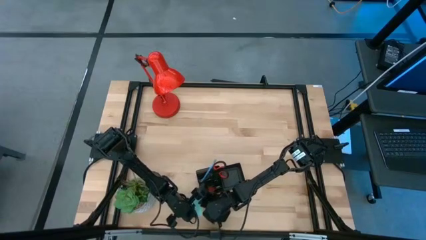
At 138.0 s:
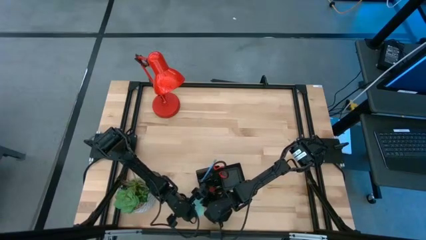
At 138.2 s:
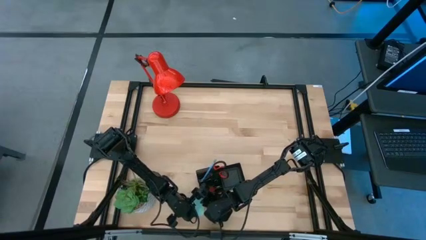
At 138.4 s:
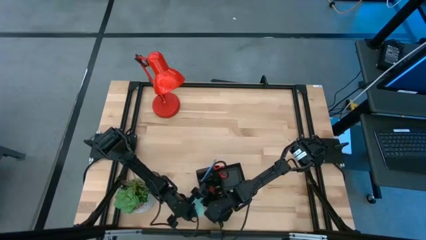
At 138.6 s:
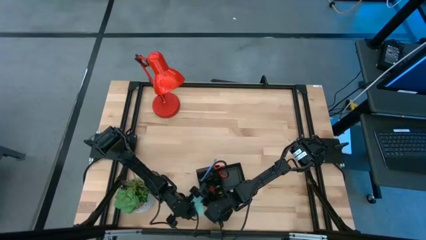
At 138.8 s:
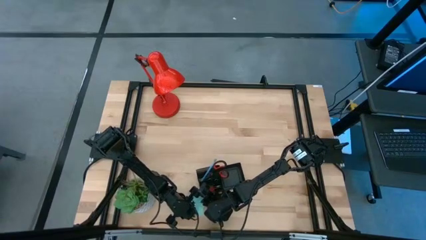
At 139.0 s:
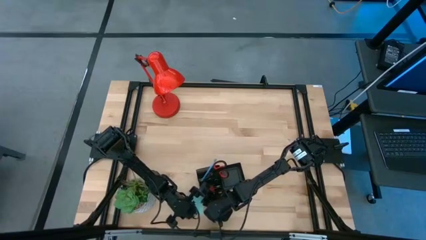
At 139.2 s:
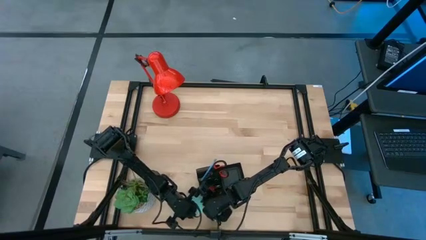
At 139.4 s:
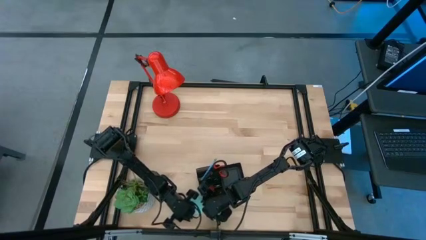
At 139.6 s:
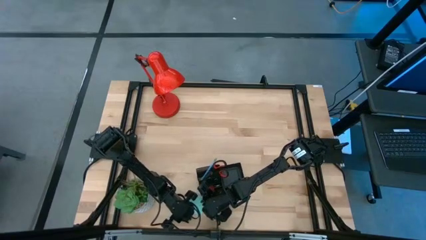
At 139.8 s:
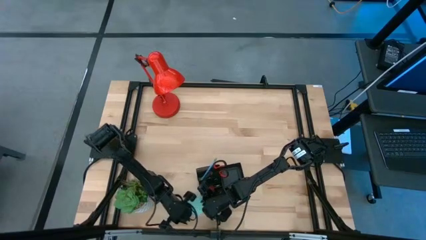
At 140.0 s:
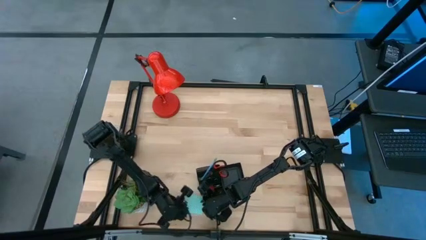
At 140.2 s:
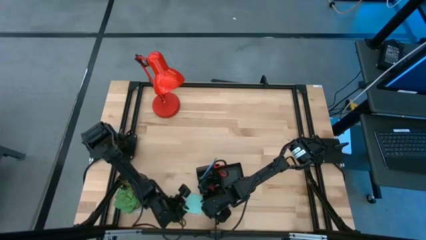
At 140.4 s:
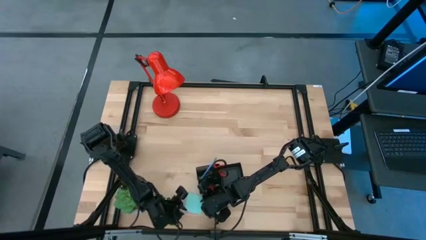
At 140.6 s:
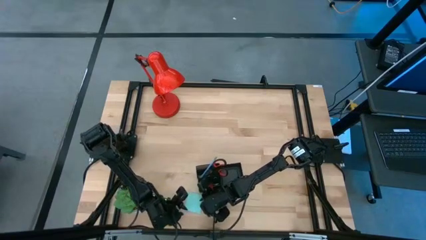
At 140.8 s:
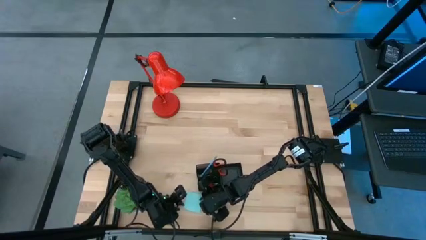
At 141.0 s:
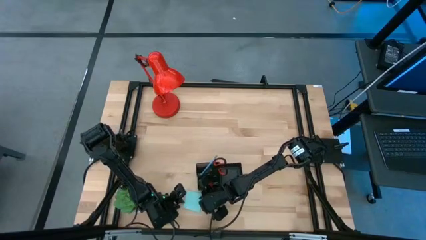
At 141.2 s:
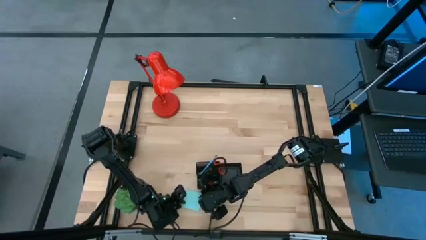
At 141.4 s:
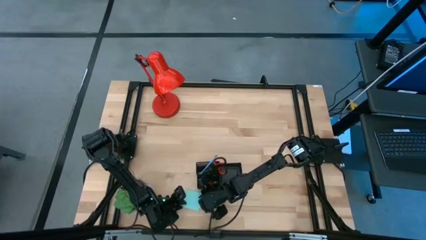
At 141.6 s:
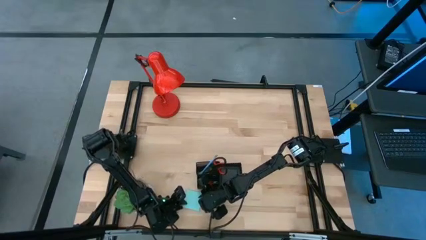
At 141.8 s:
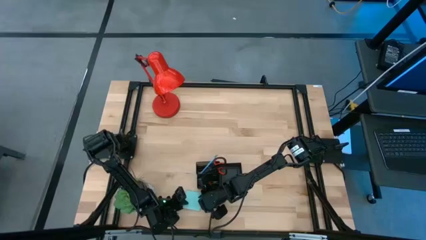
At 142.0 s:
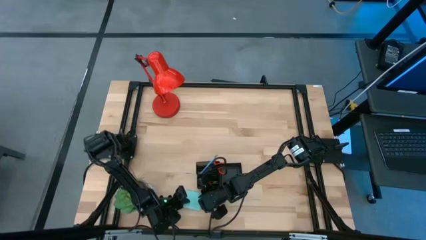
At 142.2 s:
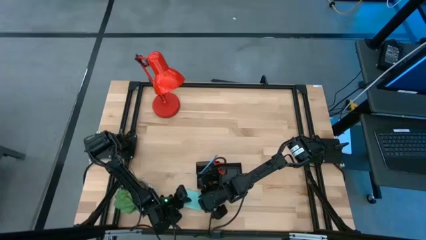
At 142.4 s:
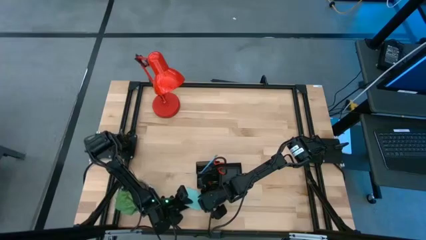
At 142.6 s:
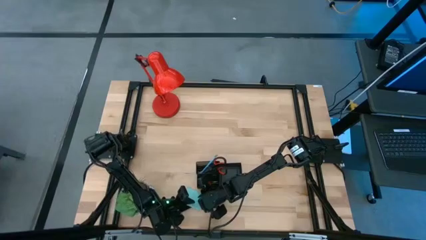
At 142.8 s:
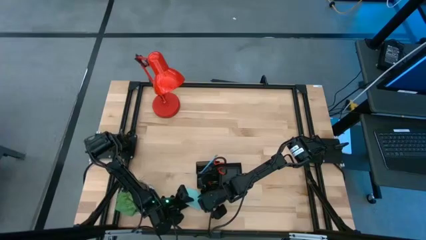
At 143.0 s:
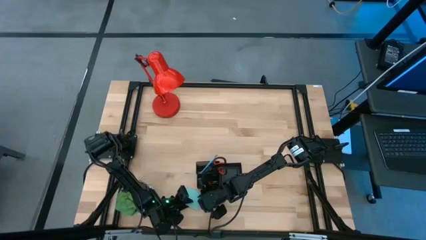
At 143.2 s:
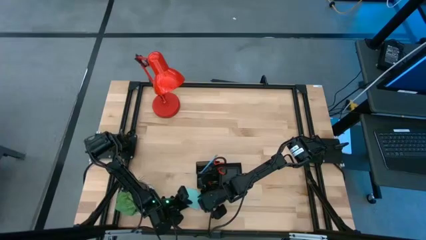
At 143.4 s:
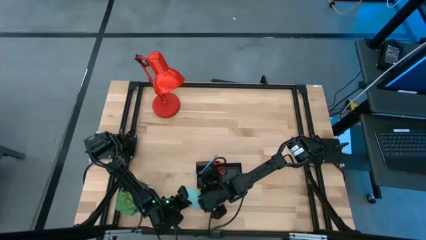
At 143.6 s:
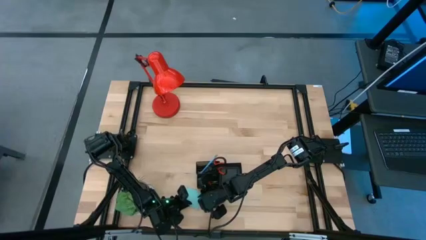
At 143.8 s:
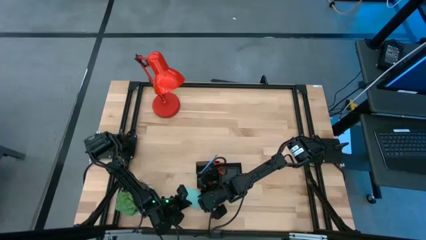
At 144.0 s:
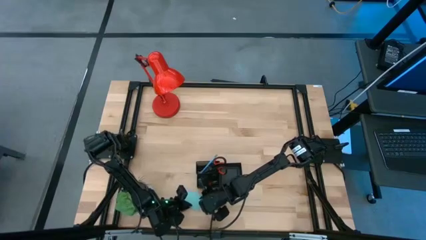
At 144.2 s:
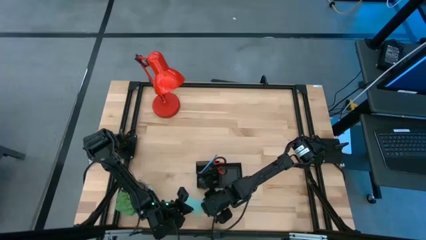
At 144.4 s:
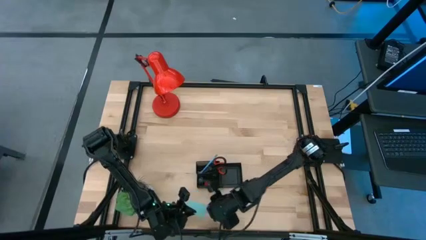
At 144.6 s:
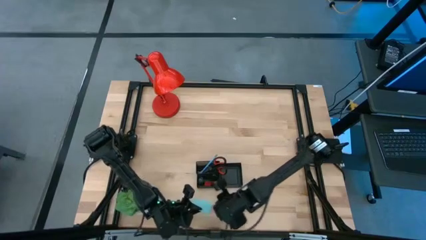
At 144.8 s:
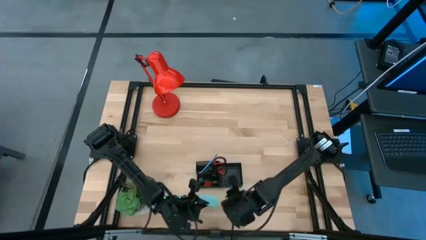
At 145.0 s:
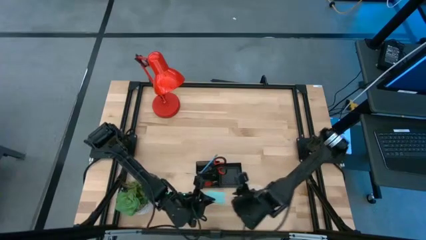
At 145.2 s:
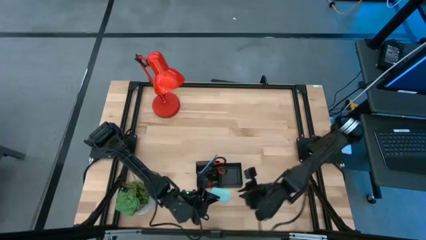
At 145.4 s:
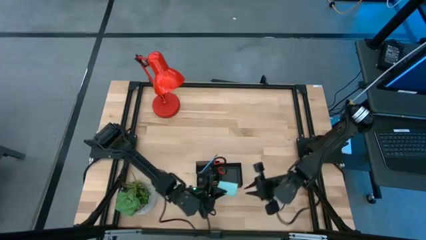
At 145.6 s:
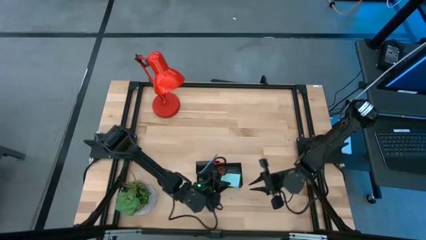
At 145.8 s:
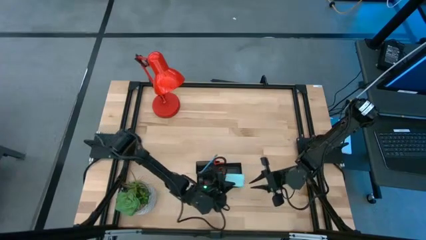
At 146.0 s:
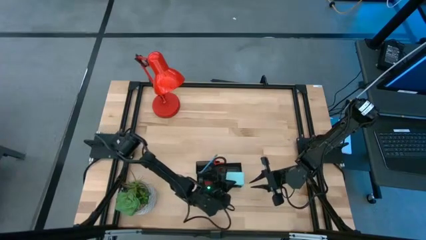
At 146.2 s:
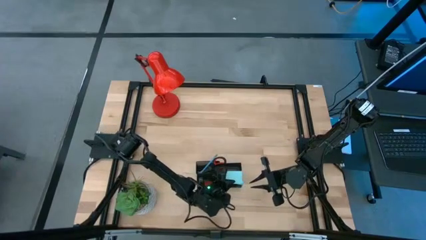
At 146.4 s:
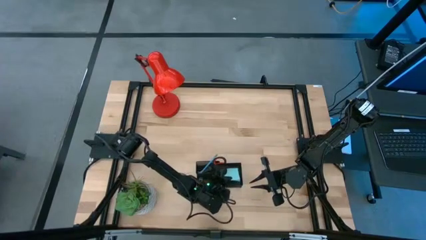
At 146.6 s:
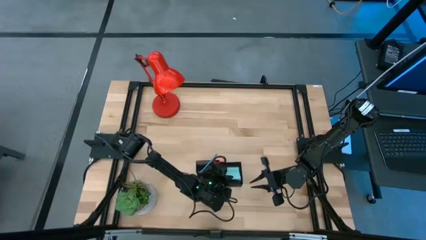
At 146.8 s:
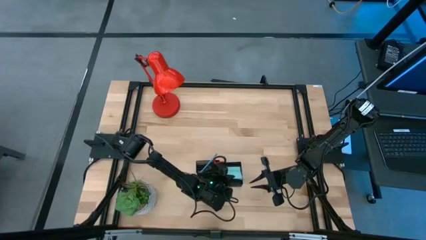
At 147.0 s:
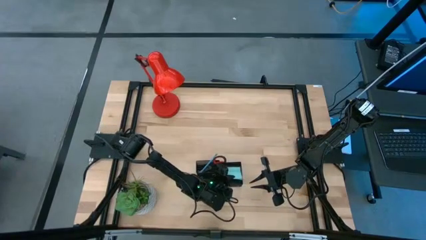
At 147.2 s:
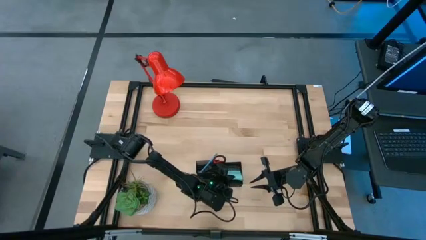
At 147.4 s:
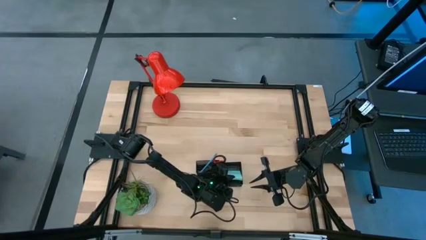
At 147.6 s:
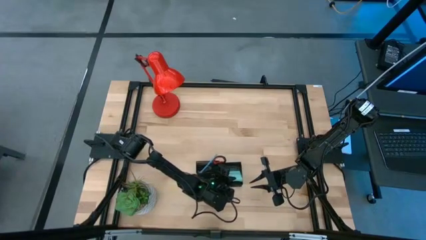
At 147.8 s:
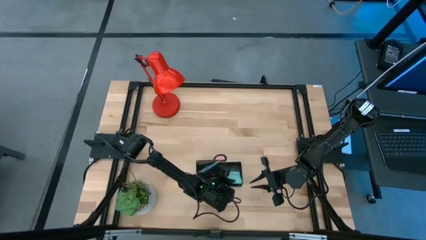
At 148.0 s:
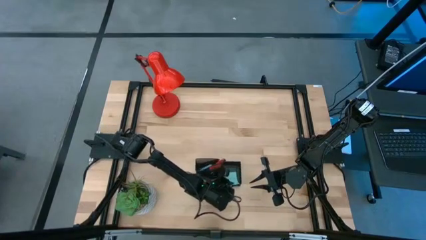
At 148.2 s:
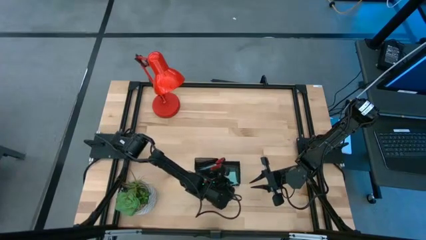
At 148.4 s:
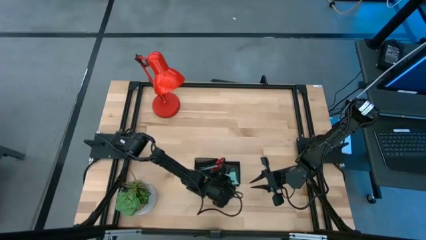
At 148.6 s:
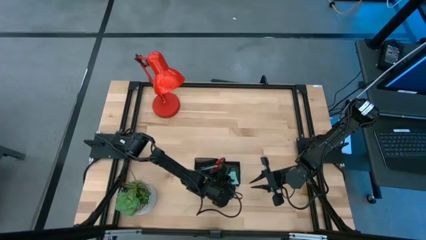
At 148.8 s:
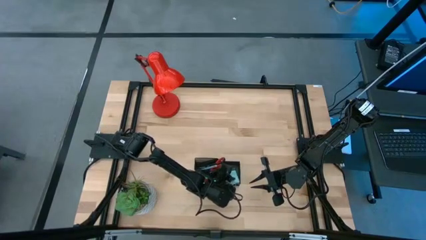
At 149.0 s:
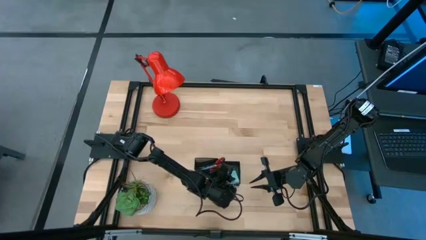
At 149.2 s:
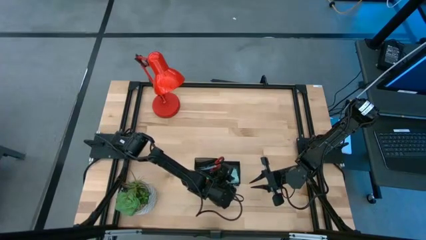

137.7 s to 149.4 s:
Task: Pick and place office supplies into organizer
Put the blue sticky notes into the black desk organizer

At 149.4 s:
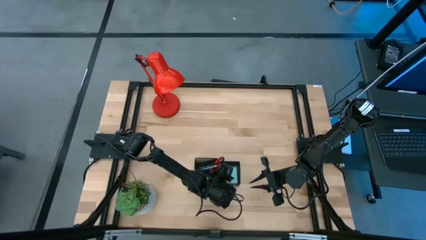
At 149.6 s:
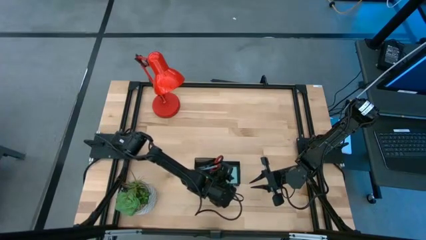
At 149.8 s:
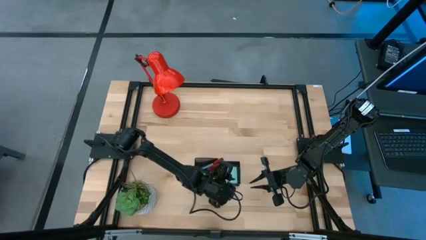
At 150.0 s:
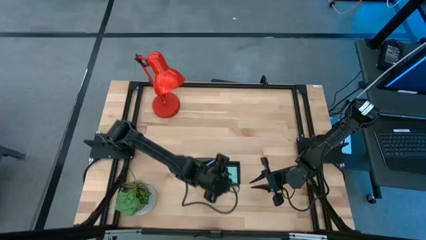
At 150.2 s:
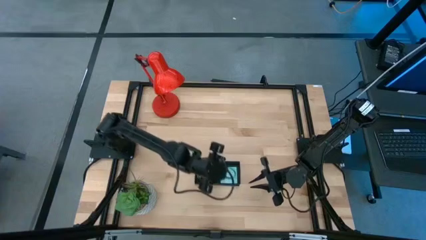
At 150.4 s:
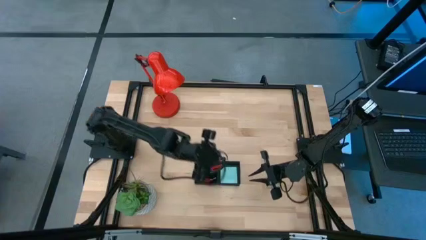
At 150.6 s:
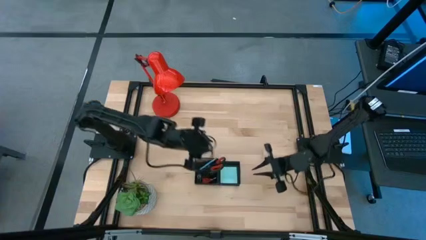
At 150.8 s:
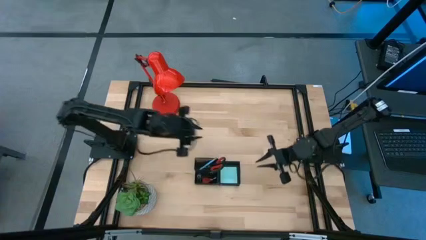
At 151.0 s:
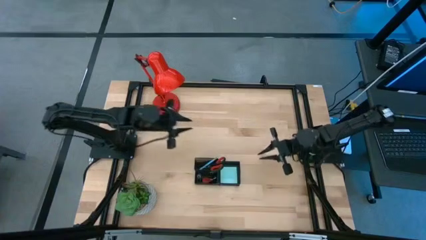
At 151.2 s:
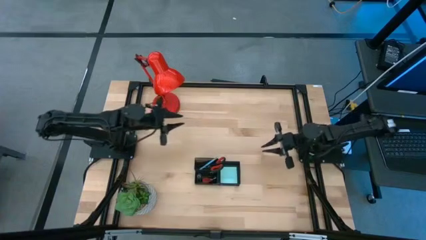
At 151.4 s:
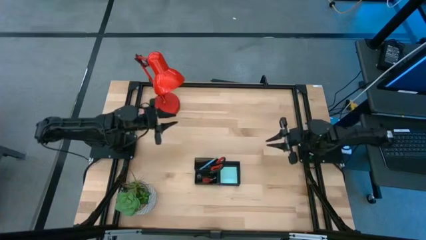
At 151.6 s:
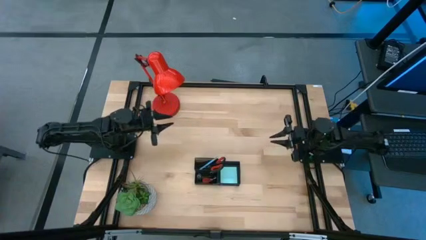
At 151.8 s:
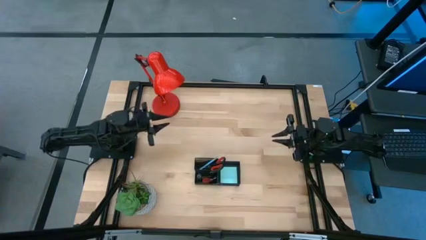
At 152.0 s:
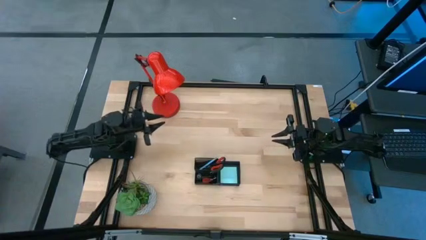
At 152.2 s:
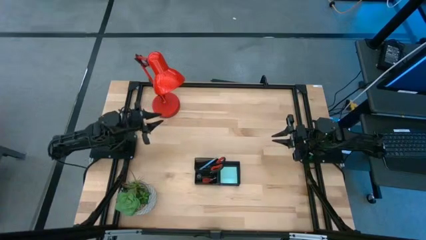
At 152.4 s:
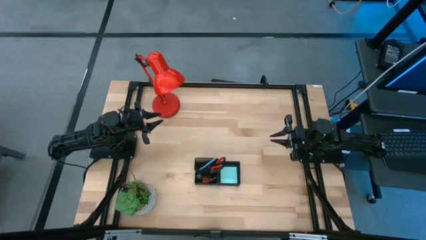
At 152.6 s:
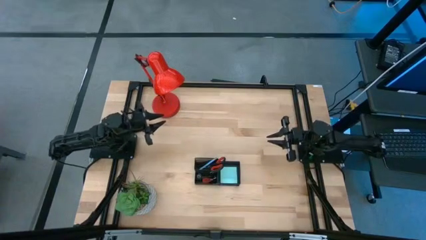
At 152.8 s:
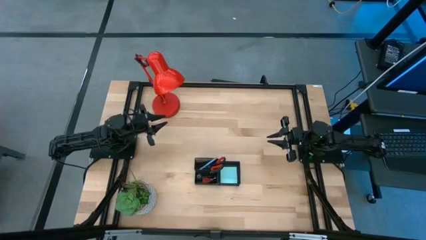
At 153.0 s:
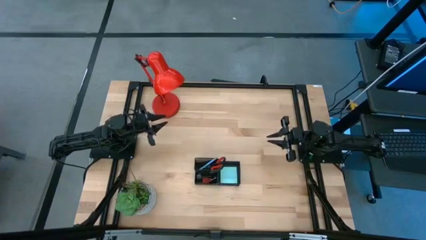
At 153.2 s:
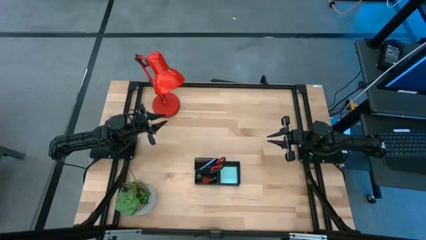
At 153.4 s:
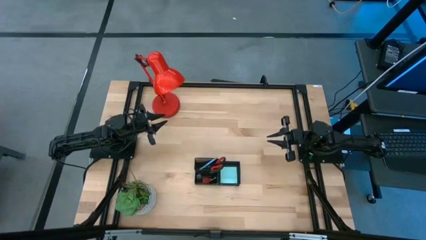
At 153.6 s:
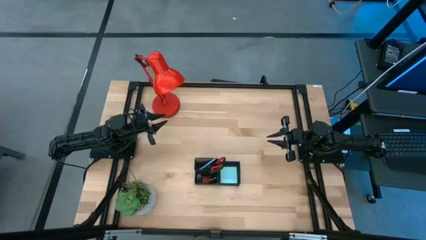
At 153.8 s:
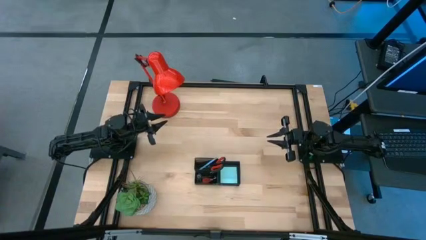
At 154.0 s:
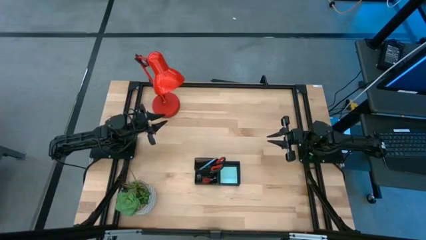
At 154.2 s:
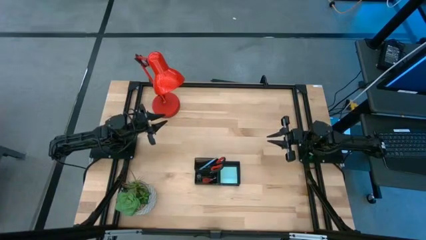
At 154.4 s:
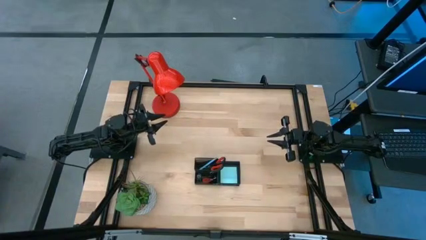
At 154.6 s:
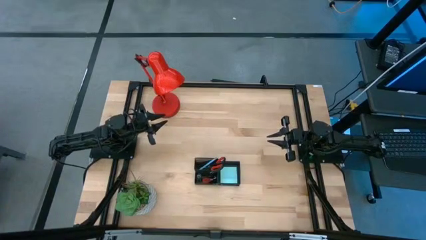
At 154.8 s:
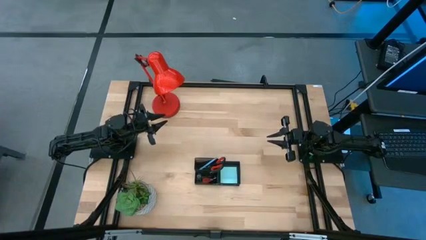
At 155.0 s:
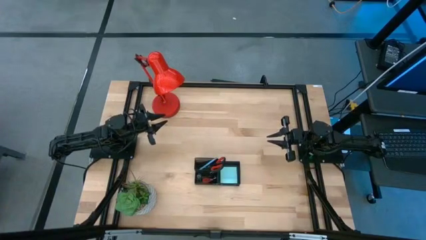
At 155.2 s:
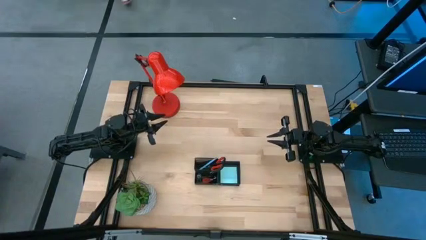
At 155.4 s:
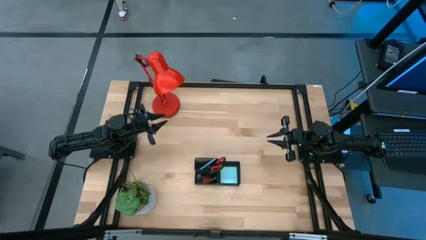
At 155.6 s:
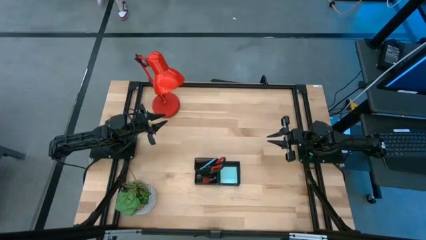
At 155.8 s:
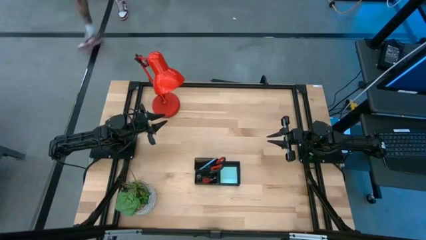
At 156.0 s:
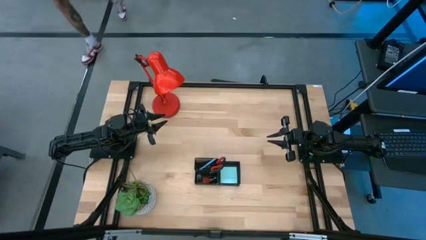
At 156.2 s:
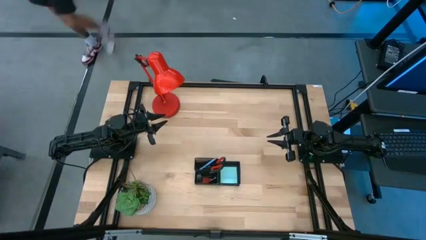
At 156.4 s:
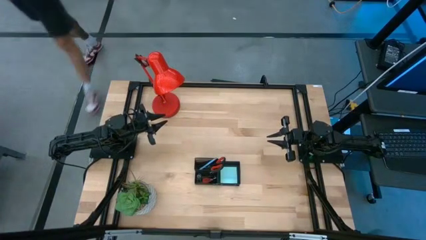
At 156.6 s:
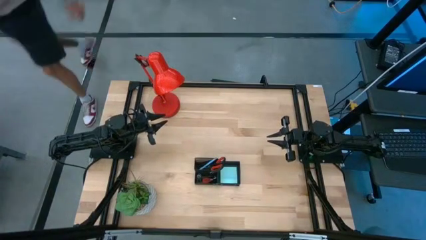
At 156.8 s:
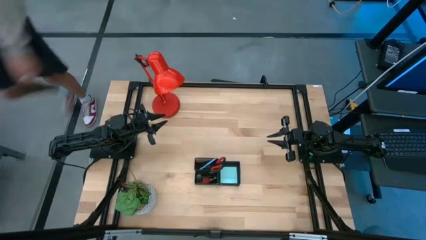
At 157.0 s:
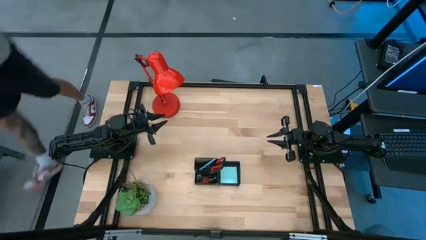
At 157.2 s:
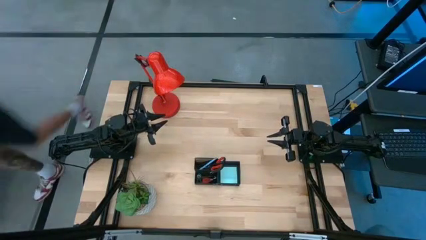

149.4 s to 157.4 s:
Return to Home Position
